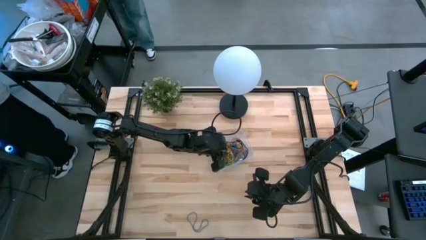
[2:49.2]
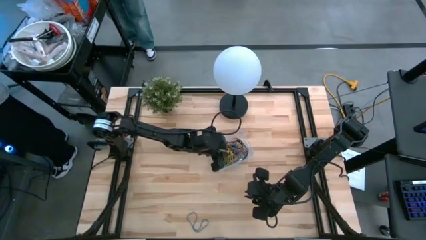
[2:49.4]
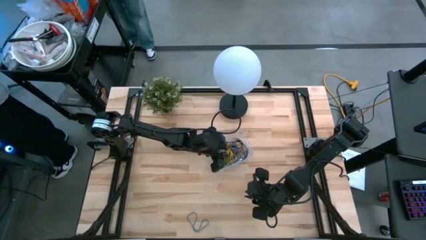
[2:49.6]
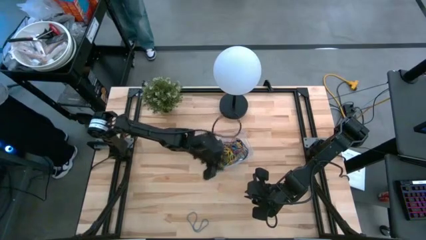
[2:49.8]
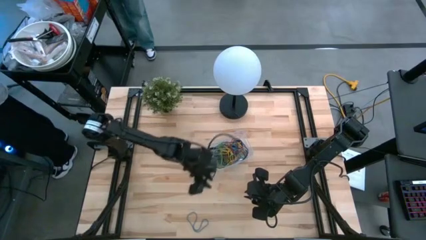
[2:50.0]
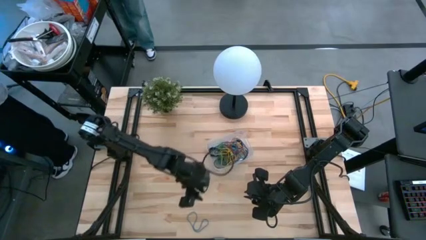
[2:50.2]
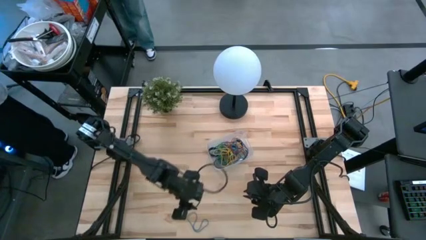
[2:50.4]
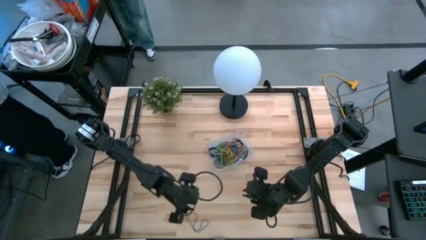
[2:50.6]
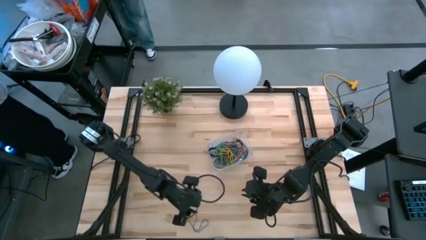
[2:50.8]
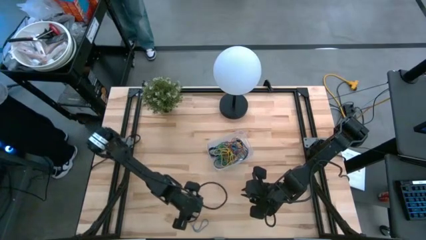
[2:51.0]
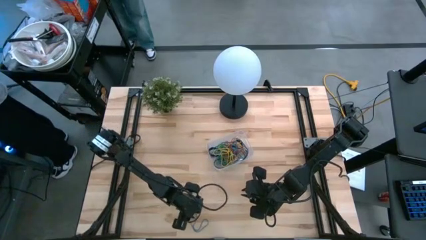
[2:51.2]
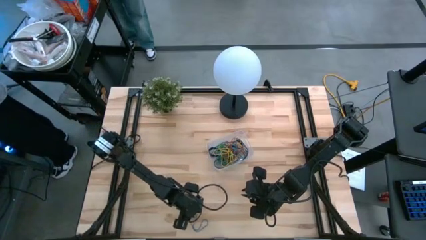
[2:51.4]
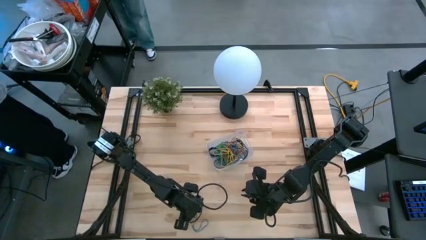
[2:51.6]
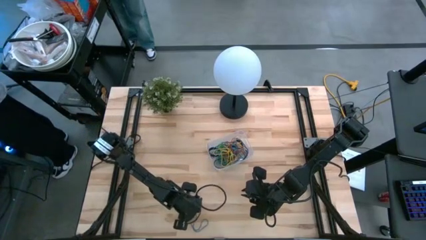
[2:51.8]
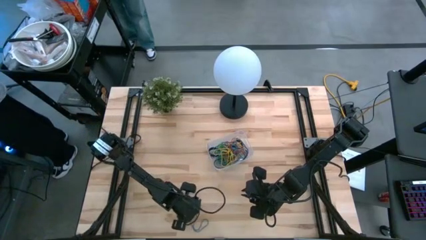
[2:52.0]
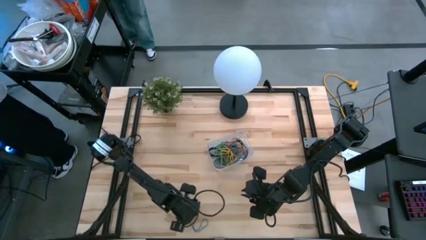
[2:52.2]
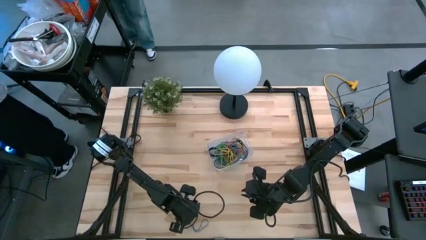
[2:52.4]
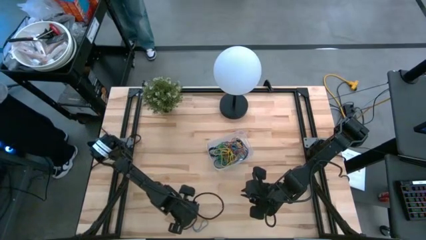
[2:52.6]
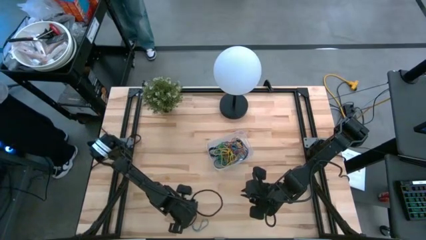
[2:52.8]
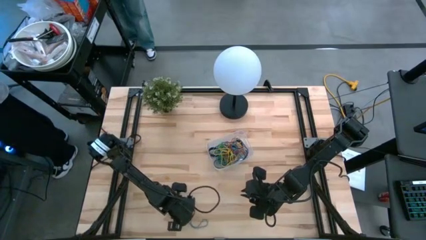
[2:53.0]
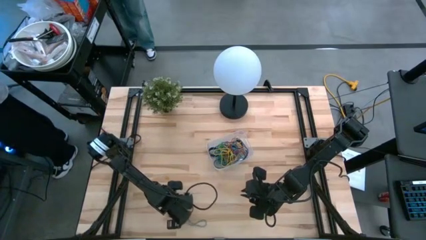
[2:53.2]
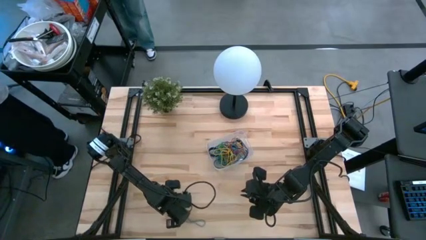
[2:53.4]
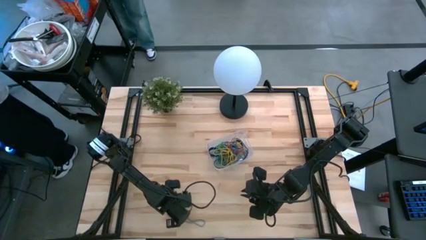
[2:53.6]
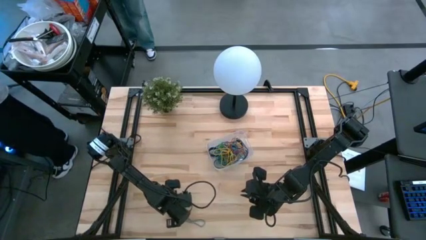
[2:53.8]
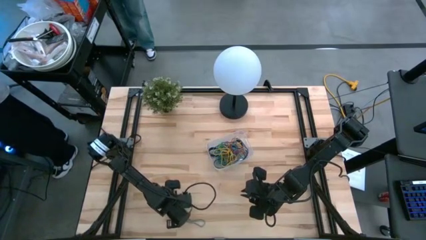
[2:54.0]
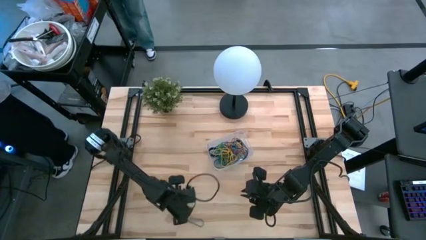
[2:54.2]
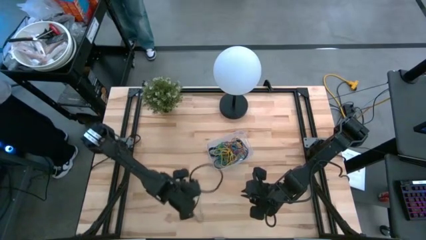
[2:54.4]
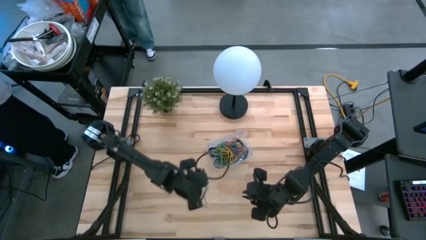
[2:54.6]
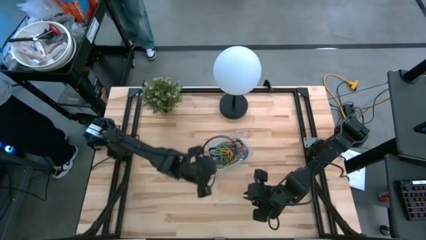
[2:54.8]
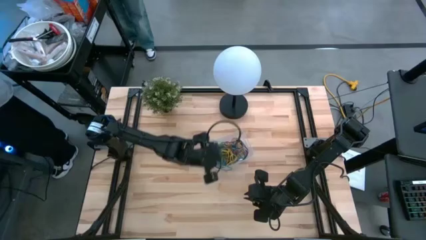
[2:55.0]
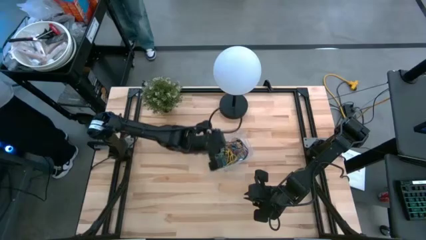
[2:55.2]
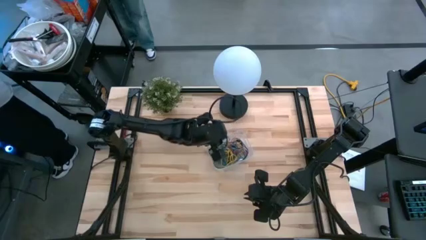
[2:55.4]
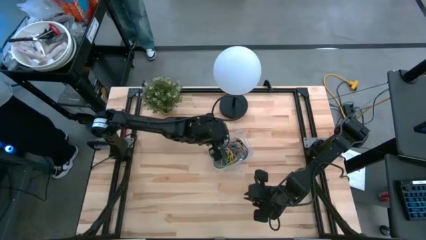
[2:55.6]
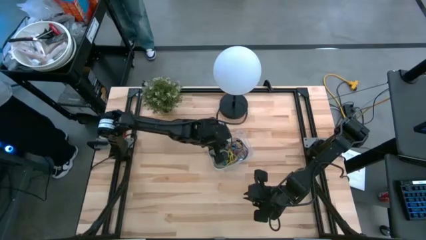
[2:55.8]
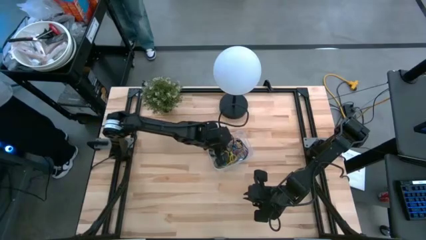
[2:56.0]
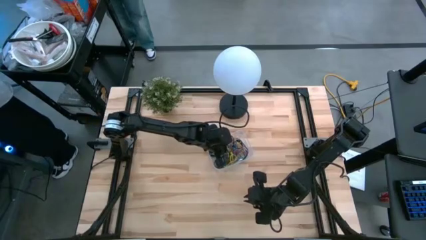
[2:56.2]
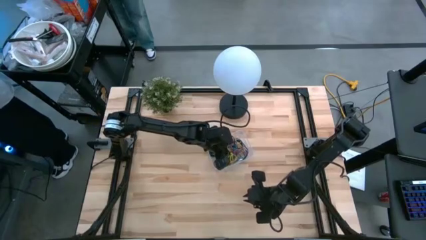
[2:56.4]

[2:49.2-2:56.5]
Task: Pick and place rubber bands into bin
Put the blue rubber band into the transparent bin

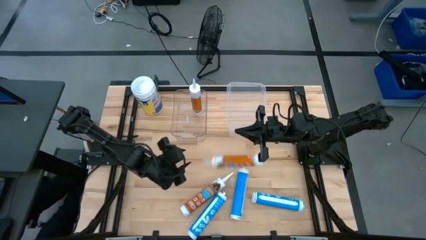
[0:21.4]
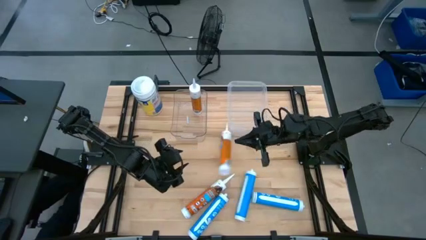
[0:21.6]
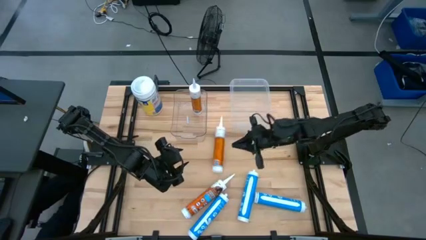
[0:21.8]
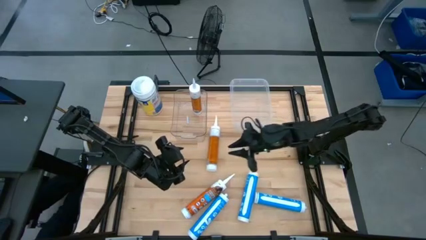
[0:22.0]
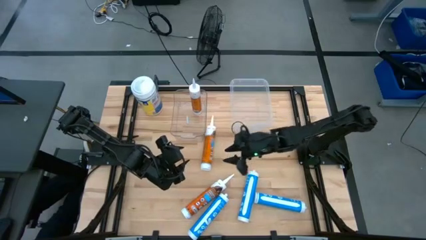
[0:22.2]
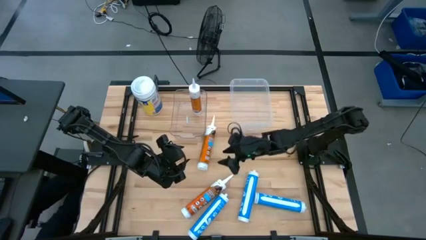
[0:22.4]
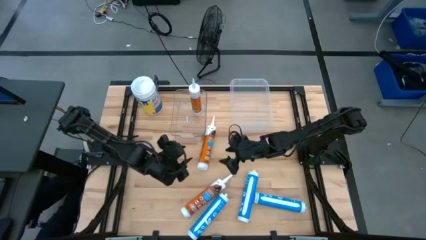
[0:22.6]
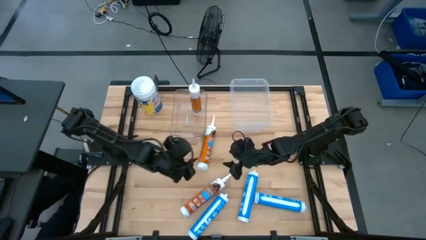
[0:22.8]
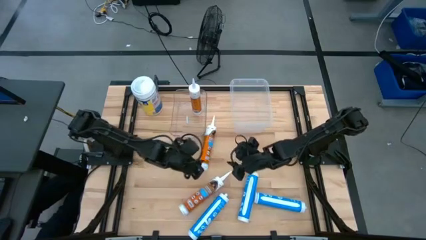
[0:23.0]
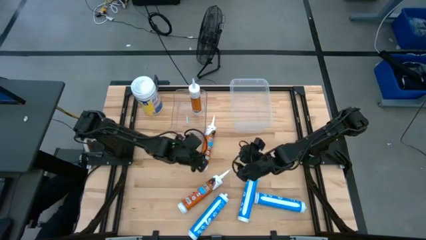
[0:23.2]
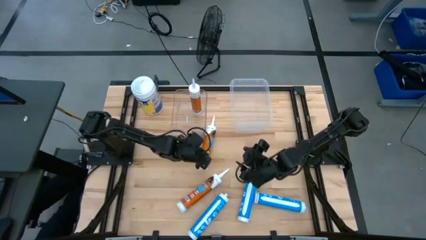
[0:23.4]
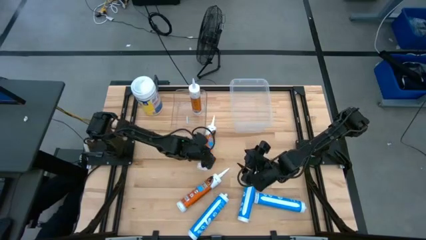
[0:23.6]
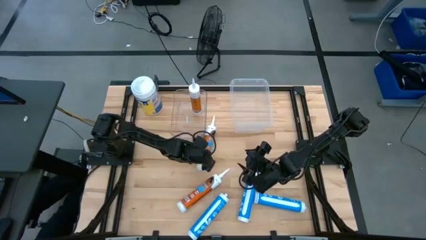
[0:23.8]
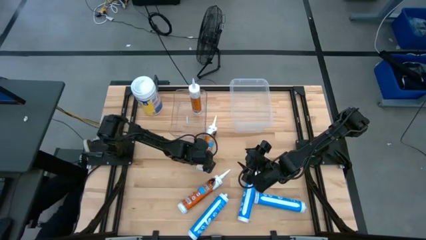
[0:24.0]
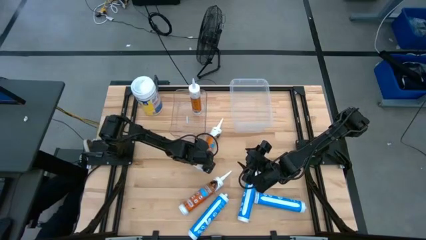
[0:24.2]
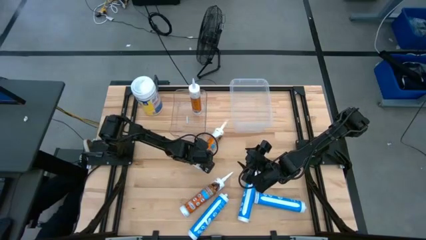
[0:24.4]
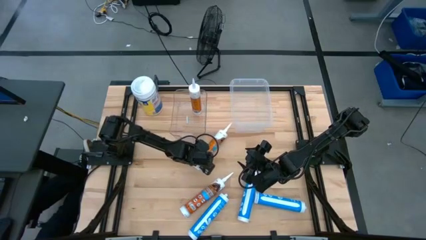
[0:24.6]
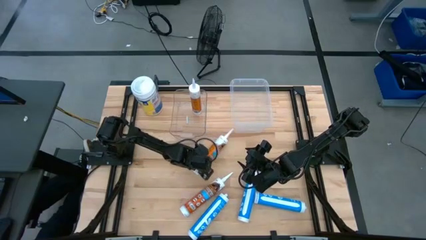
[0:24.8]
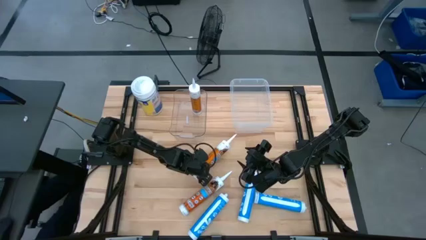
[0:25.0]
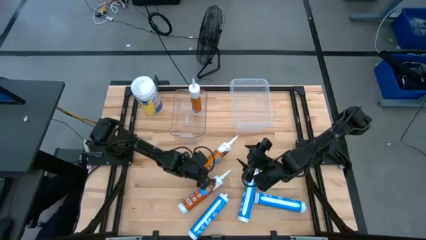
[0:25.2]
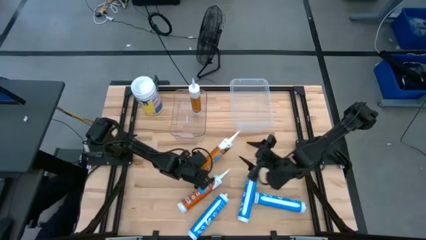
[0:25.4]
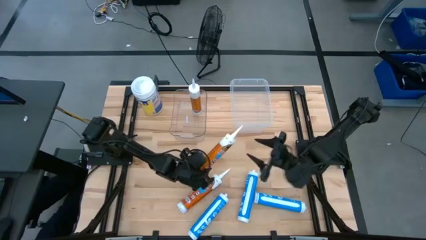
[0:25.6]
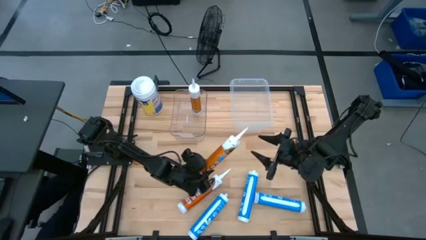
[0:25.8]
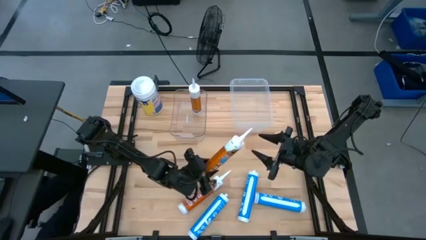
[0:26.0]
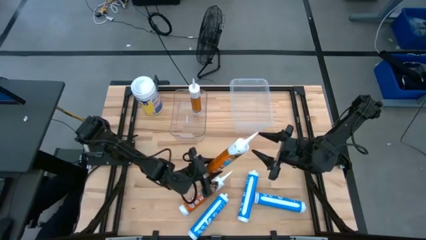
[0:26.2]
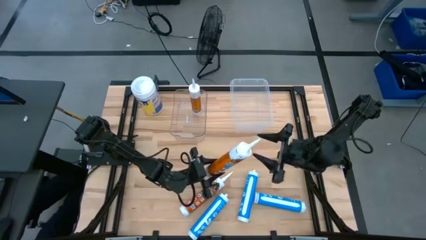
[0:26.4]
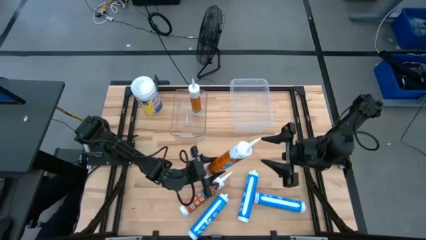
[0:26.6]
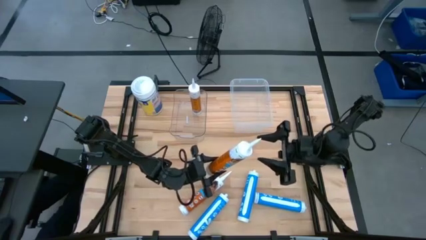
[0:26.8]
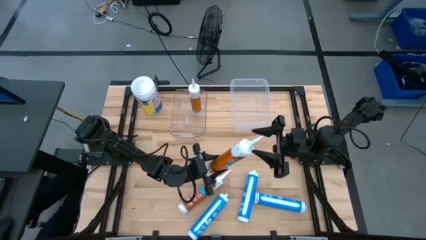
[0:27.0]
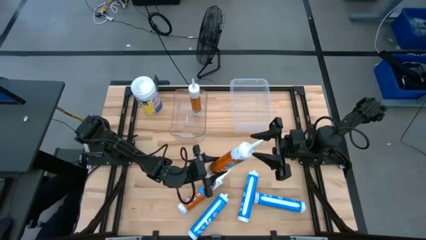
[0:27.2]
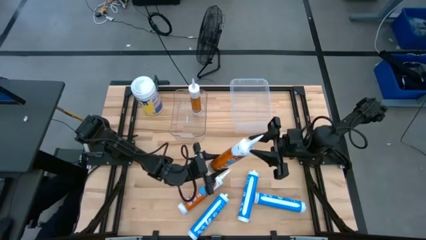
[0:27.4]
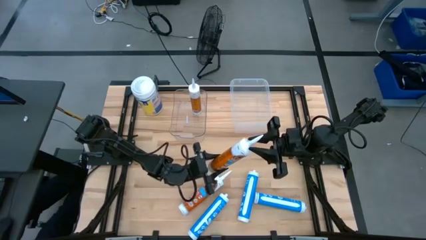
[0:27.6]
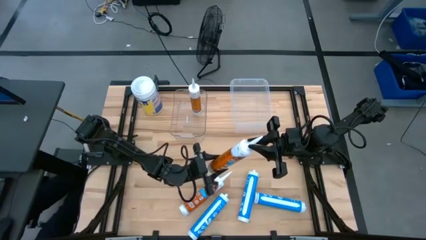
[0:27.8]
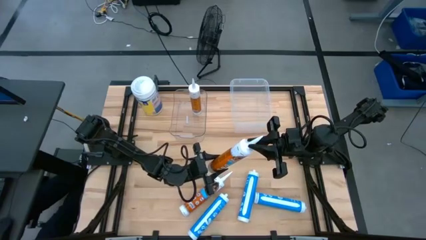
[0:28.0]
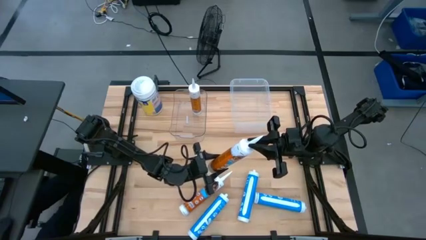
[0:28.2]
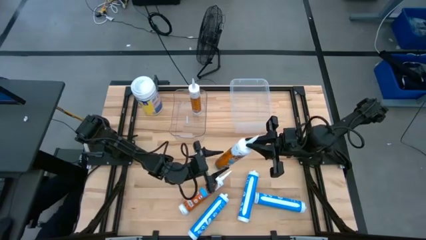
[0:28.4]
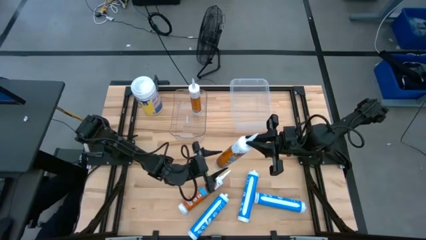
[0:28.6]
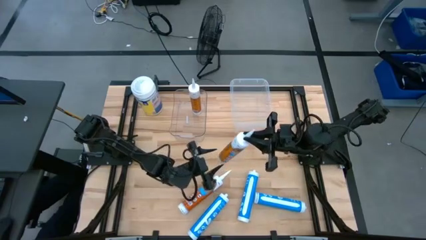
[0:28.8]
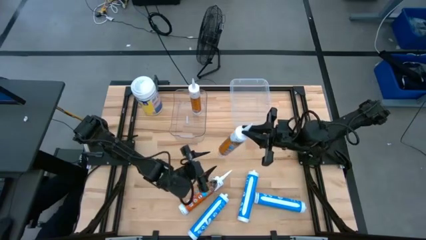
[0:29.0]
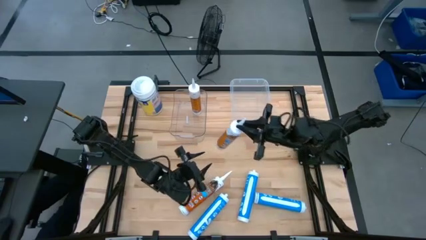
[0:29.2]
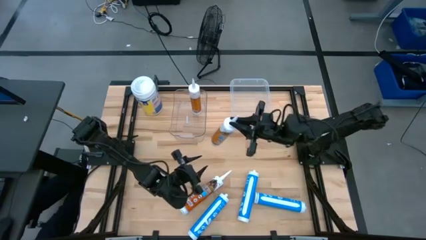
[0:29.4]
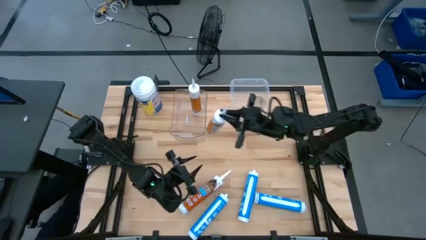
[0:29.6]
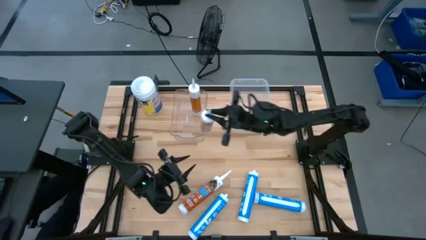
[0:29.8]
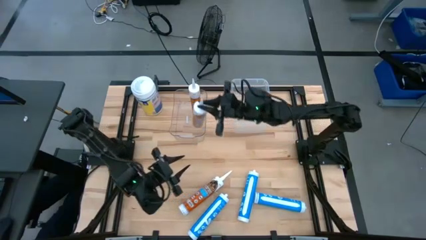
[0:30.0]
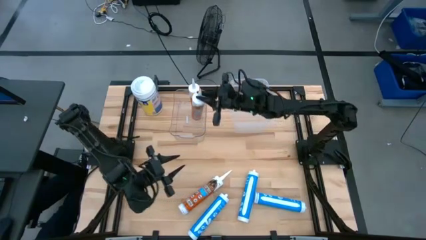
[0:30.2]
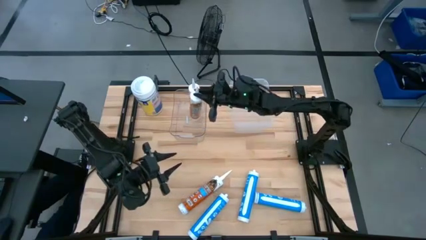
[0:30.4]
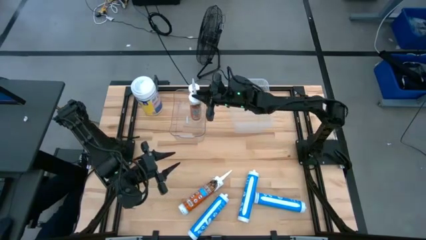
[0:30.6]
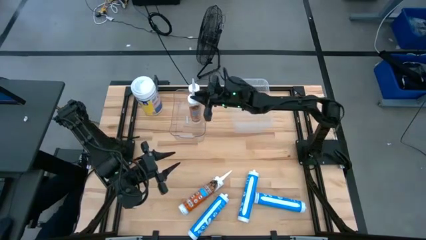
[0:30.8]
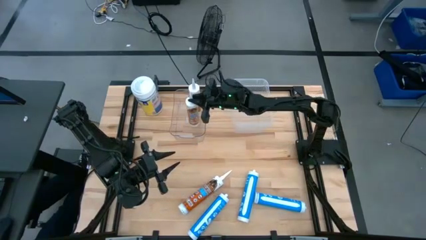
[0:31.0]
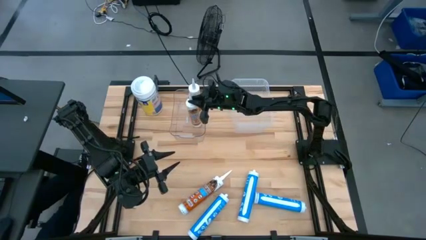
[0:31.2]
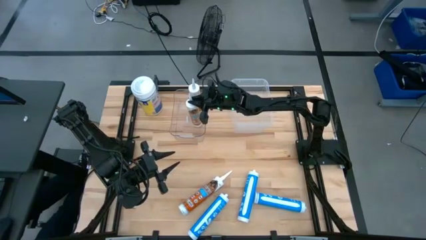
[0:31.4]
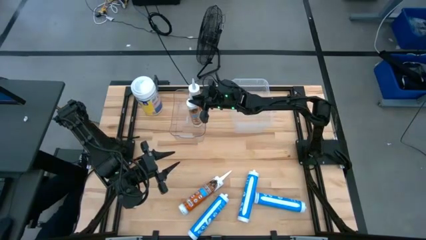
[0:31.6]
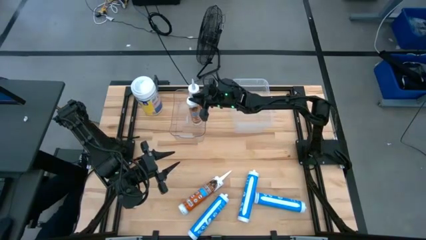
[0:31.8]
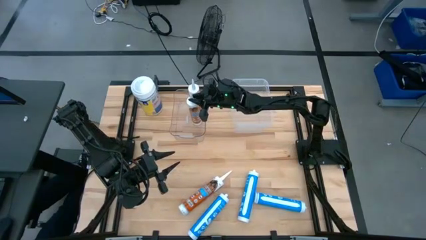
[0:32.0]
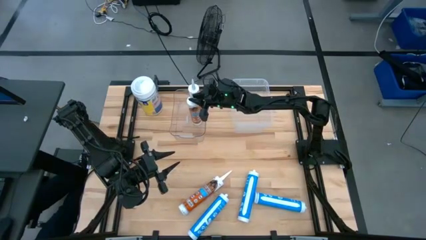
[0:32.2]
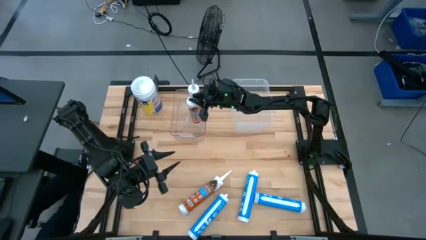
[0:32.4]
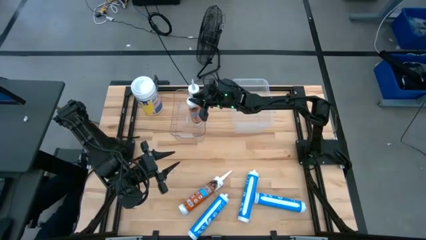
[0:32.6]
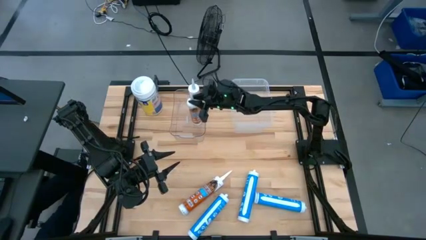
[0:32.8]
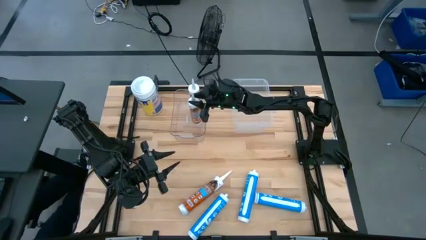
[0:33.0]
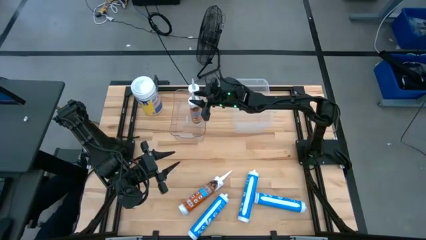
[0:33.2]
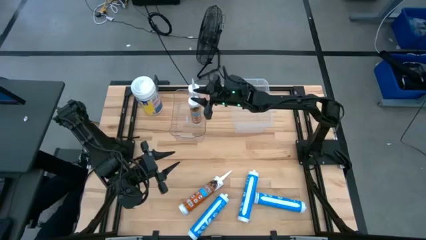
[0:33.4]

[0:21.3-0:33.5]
Task: Pick & place silicon tubes, Sealant and Lysol wipes
Put the top orange sealant into the left transparent bin
